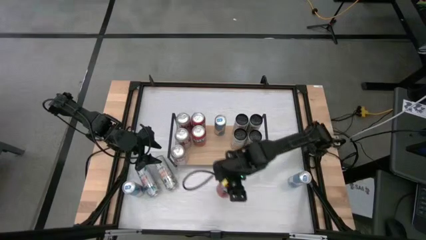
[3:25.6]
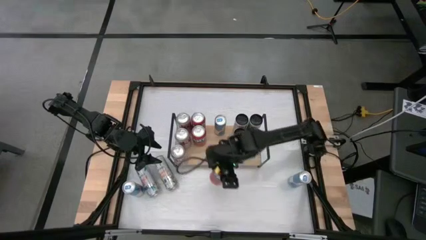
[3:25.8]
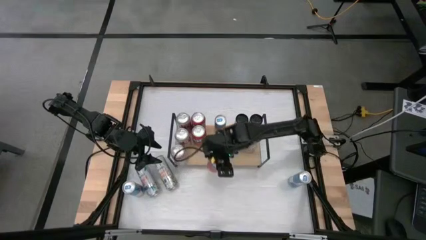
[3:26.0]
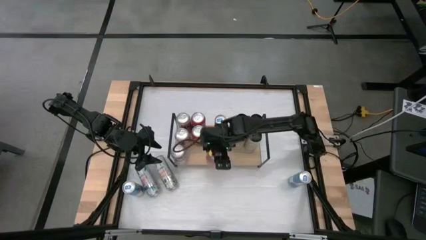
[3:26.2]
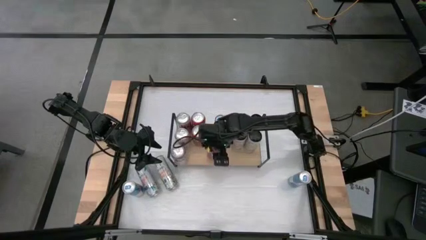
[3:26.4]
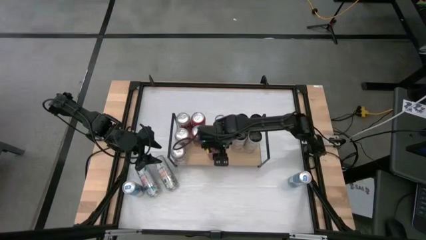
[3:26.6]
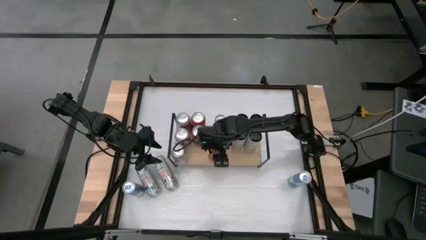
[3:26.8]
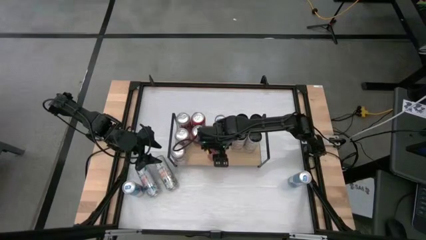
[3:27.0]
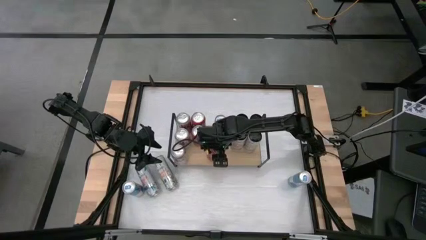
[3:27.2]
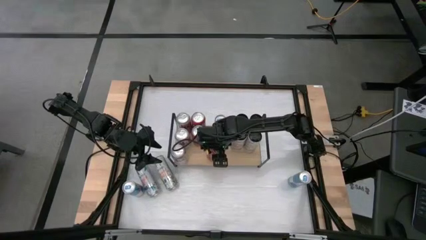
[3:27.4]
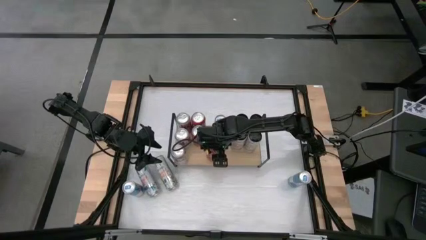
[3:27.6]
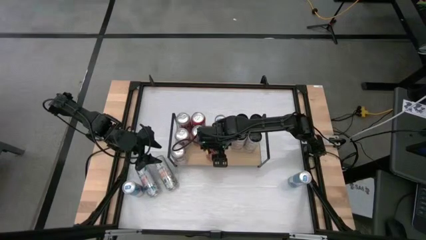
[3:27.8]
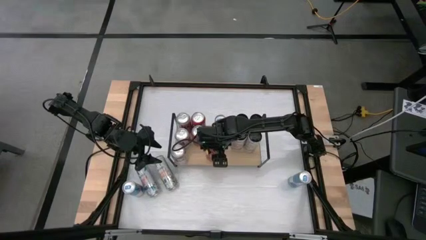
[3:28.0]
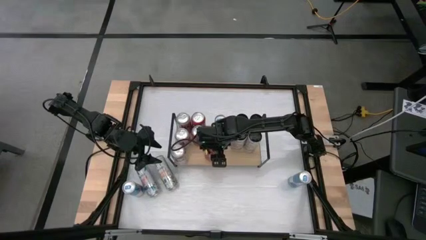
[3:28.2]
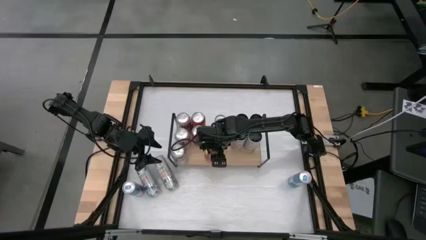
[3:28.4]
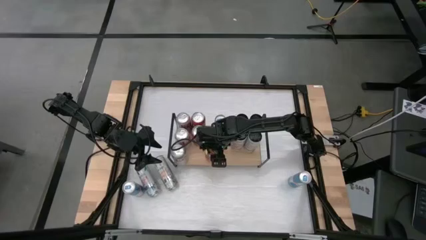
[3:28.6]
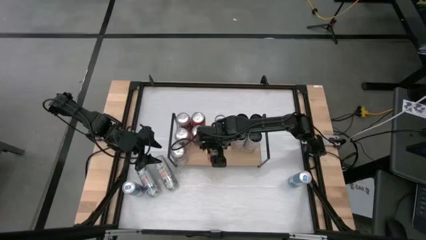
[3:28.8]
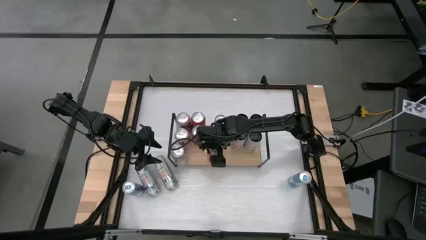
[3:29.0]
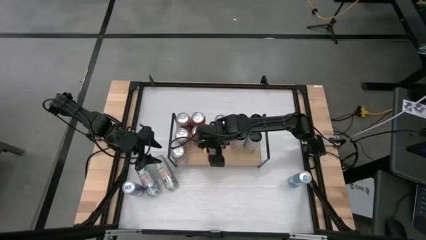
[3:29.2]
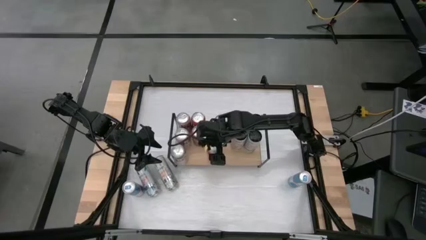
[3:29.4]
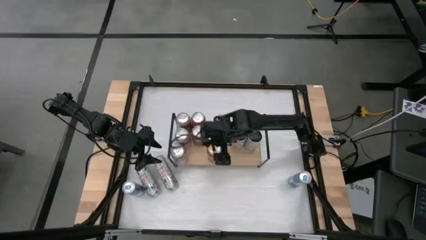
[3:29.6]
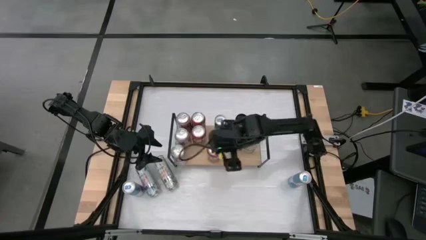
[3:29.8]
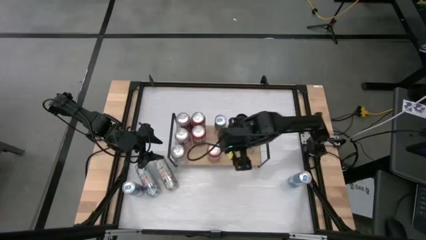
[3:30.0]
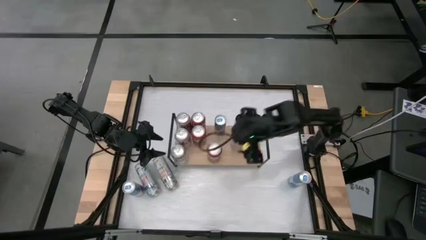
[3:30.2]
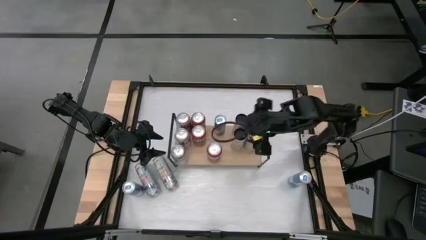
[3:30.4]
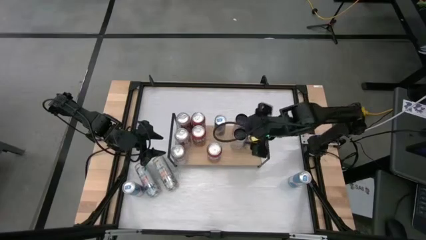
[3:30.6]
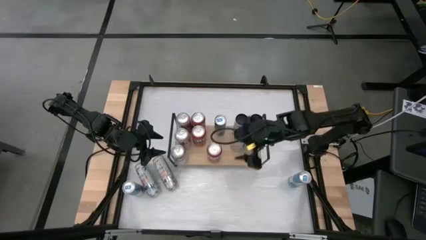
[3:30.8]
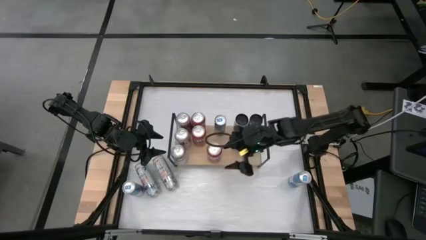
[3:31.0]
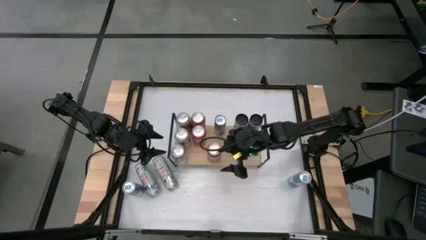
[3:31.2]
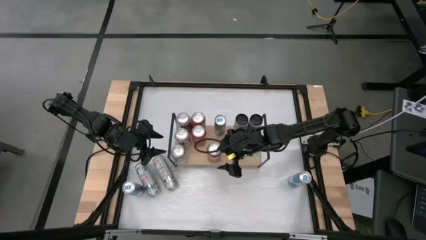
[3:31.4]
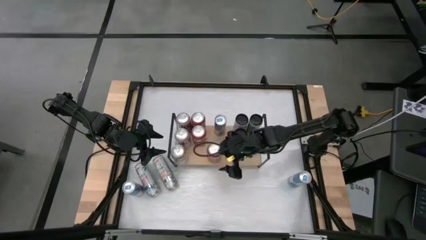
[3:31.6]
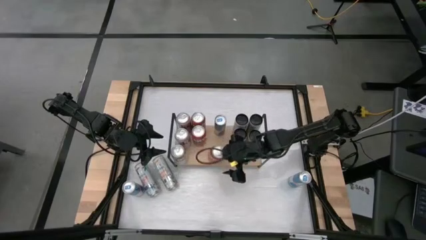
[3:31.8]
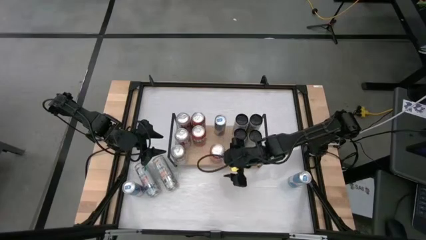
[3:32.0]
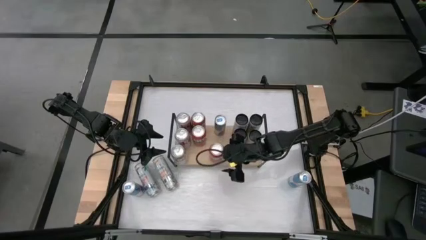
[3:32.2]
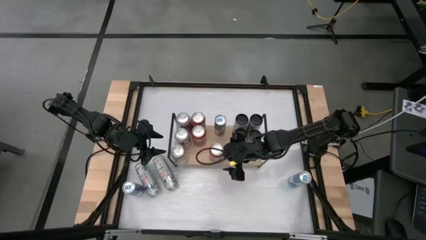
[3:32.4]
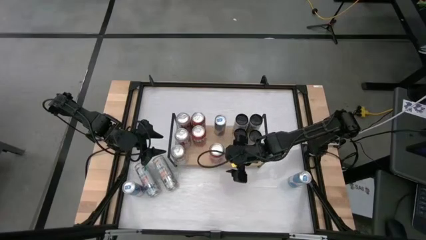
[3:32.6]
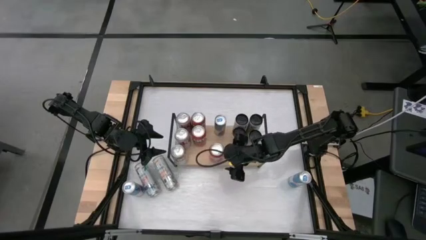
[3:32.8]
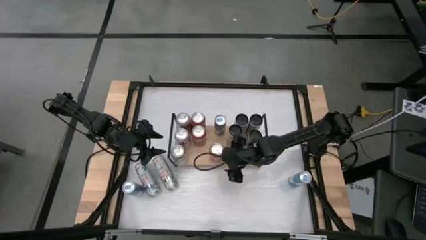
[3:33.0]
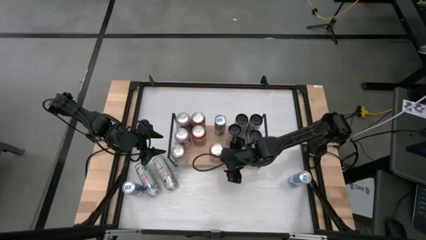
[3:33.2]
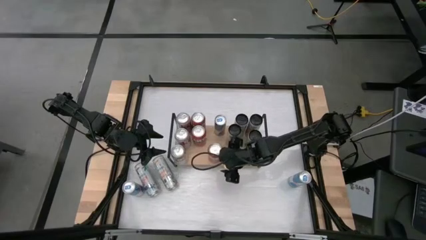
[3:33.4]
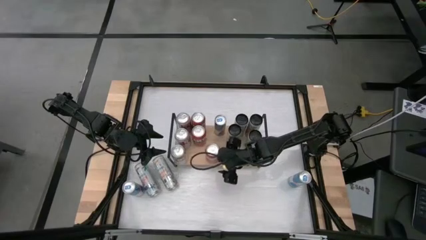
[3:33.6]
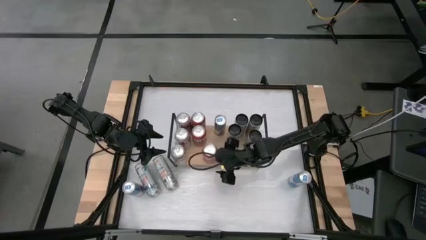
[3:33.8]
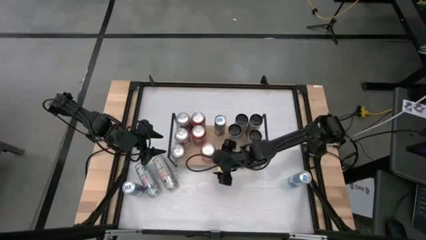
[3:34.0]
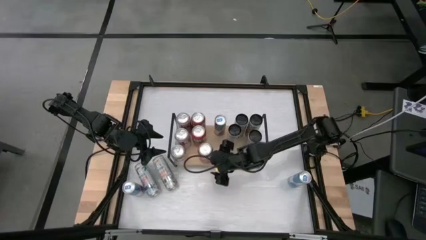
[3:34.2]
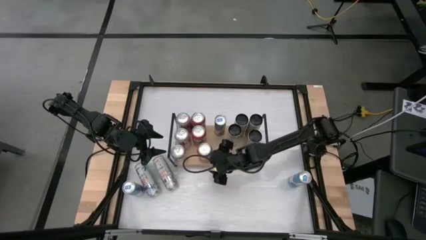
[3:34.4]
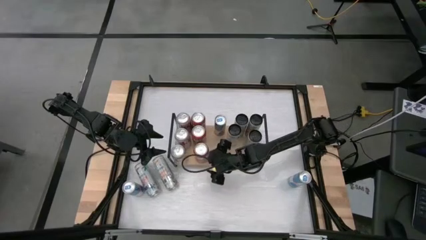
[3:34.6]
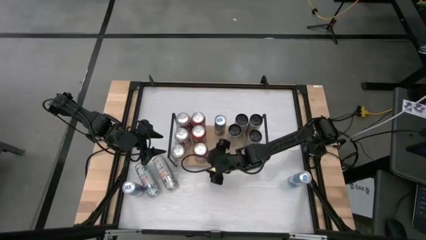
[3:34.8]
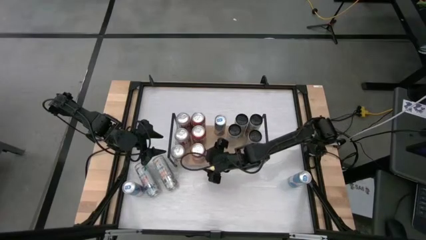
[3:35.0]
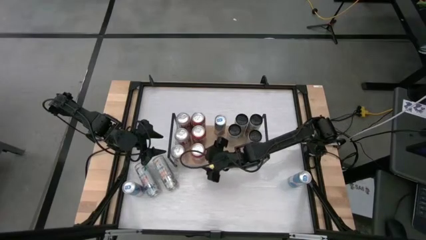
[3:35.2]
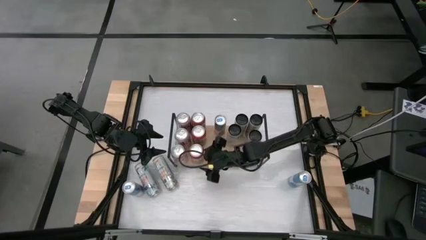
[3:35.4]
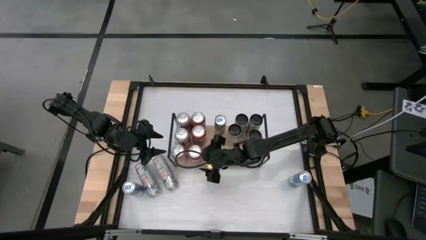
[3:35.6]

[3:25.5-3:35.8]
Task: Place canned beverage on shelf
Put the red soda can on the shelf aligned with the other red soda can
